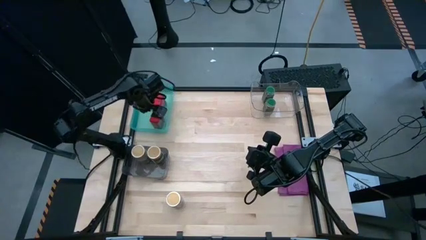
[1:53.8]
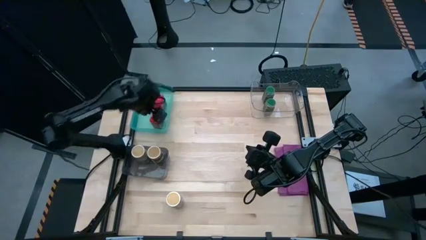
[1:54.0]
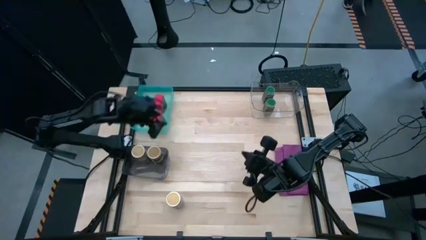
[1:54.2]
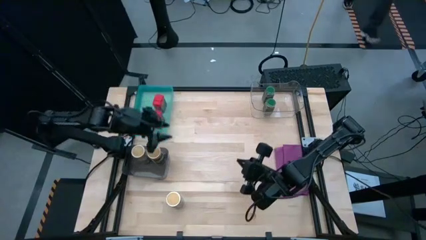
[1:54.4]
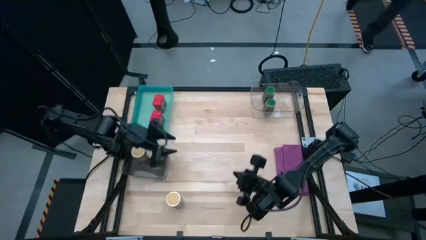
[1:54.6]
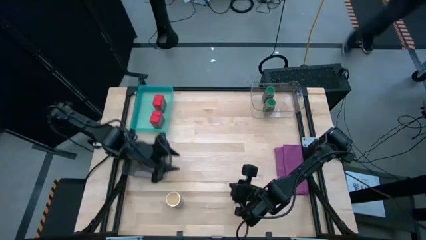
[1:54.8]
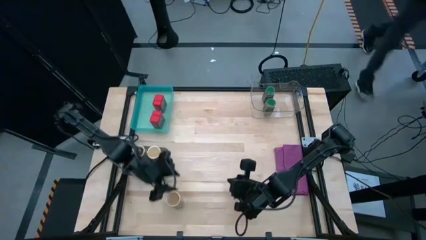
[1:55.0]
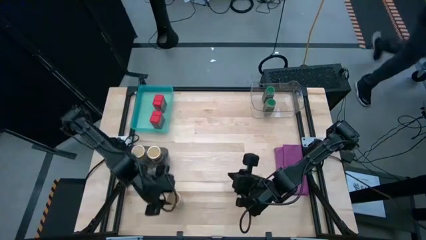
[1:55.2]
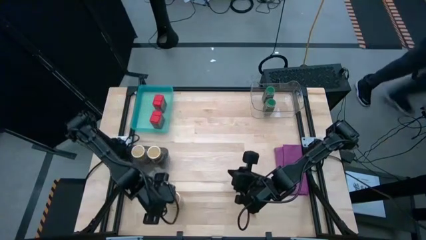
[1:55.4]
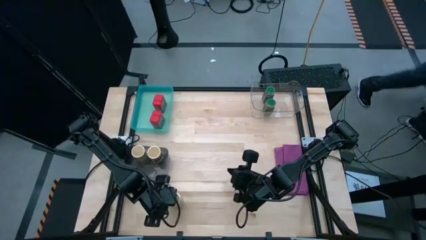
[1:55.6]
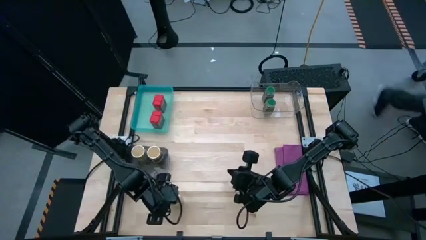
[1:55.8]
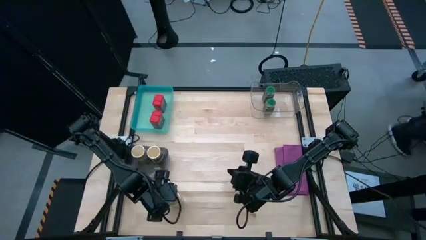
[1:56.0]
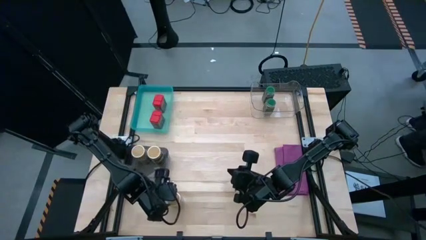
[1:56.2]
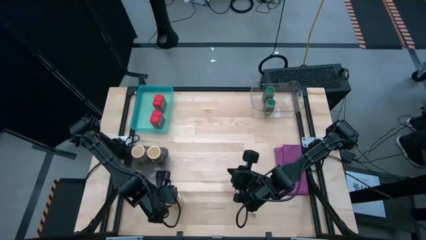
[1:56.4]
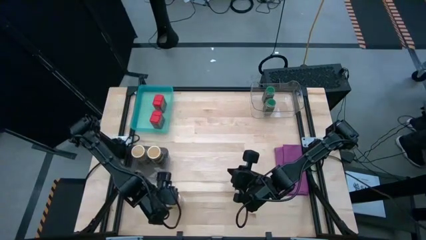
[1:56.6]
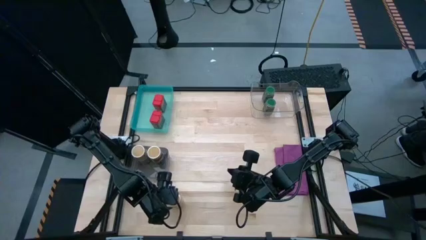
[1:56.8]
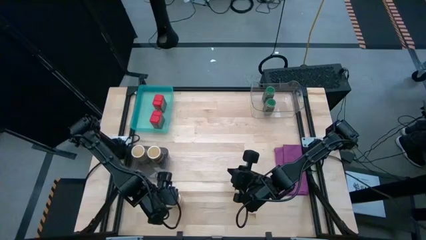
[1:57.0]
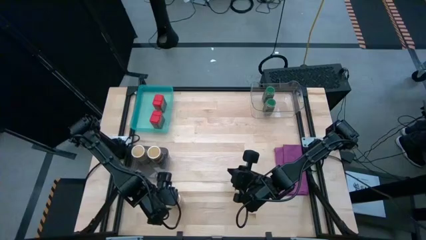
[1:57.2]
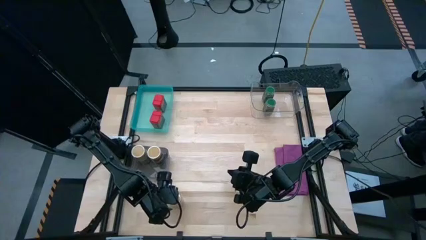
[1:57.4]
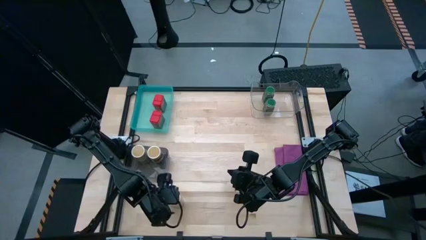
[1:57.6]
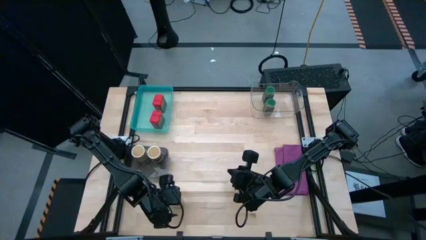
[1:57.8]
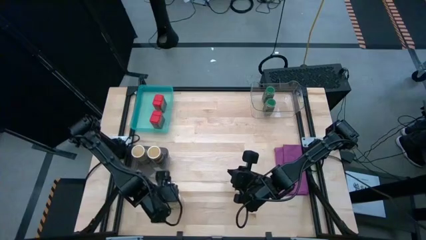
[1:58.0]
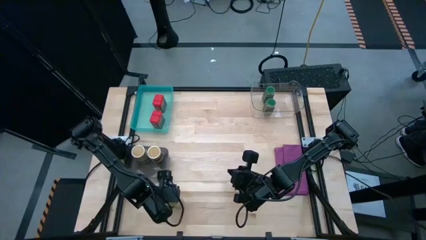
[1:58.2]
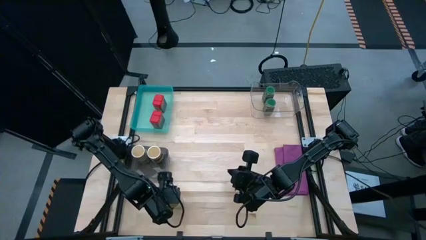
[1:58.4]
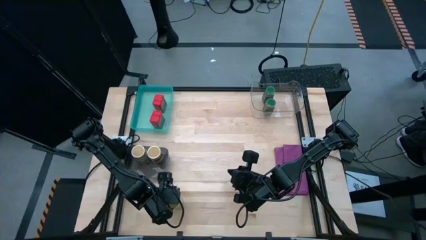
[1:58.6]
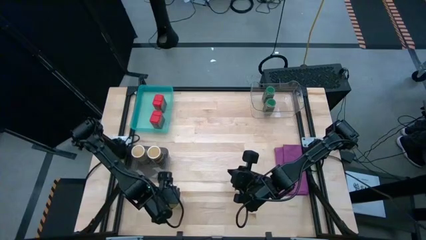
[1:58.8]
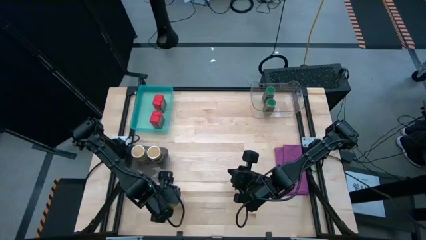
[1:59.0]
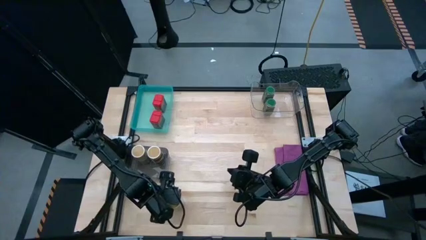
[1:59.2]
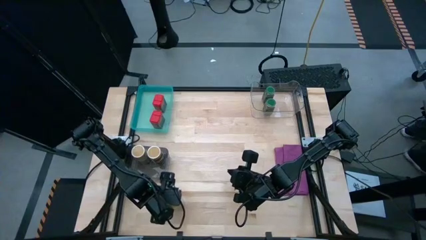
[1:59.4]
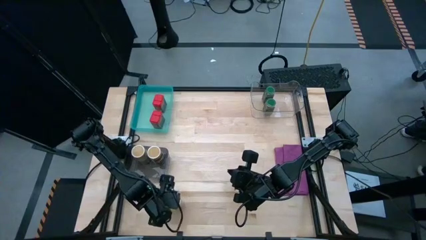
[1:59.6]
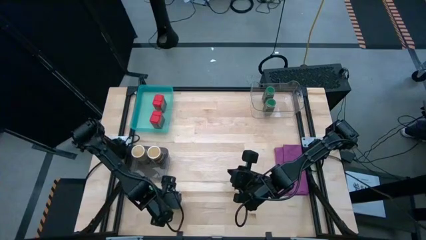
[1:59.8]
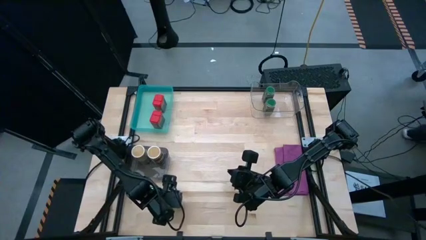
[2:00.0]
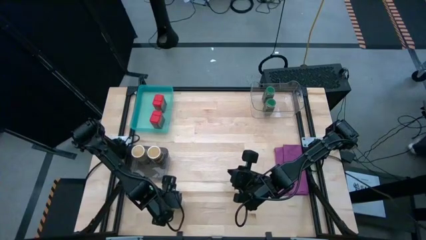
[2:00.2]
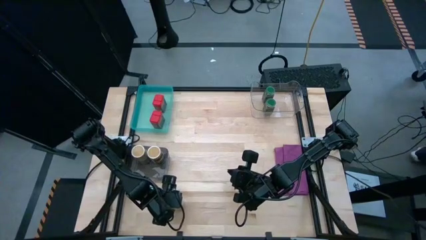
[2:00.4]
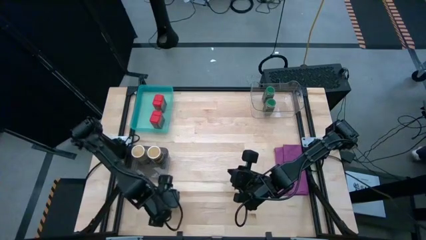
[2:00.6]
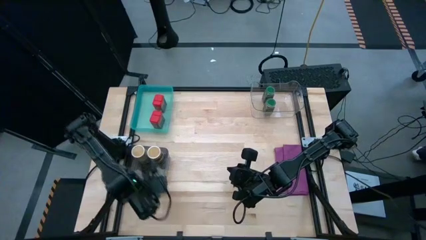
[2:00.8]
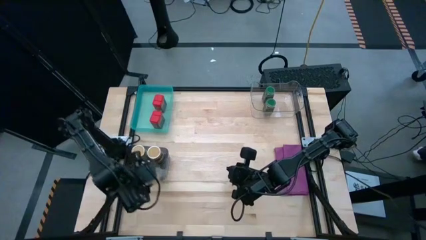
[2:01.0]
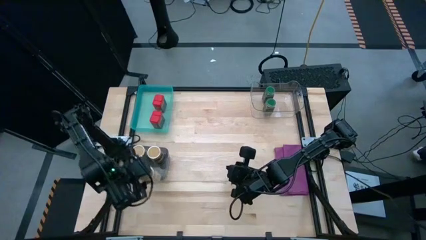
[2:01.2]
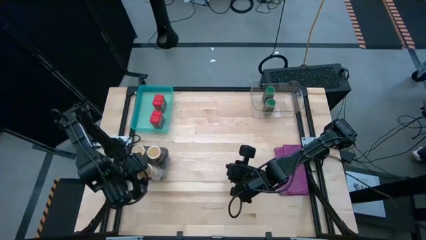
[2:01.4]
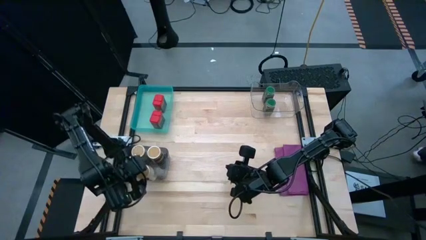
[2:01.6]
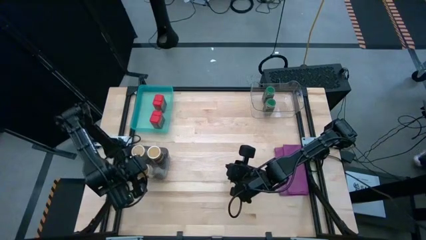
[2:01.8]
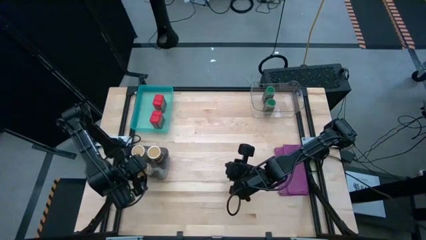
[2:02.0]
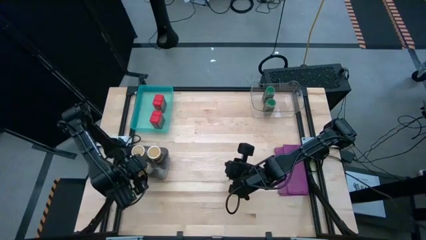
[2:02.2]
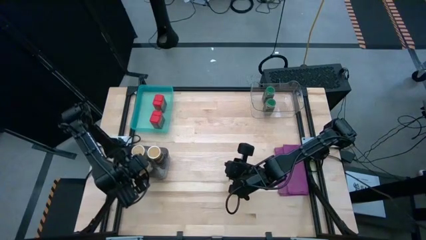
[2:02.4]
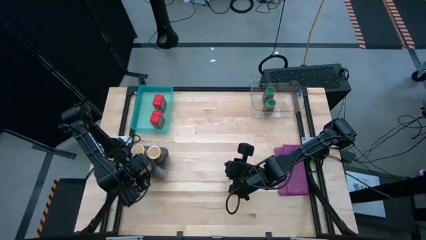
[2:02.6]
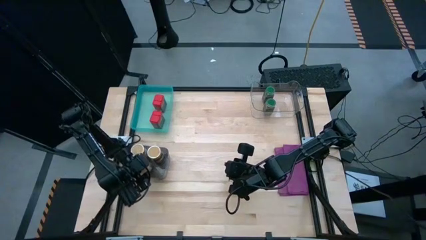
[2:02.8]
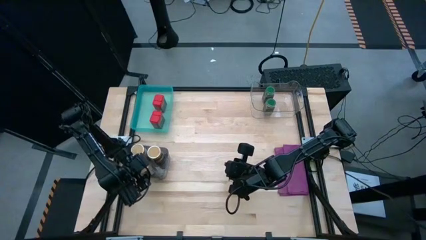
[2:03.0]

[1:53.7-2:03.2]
Task: Sort spices by type
Put the gold seasoning bottle into the black bin

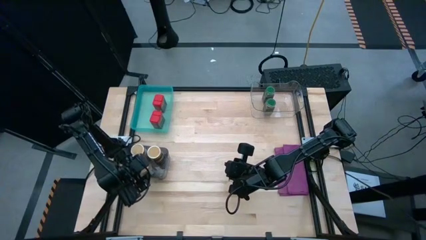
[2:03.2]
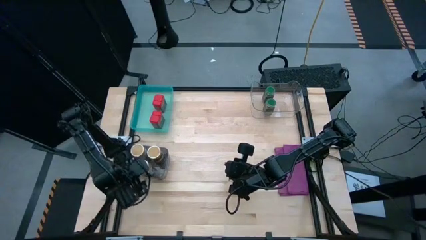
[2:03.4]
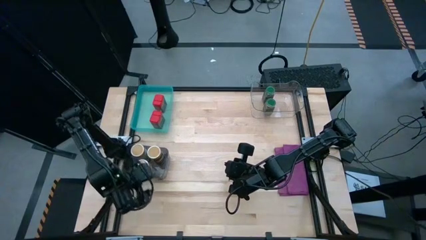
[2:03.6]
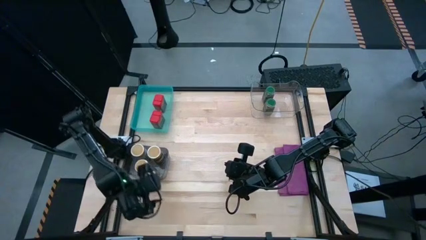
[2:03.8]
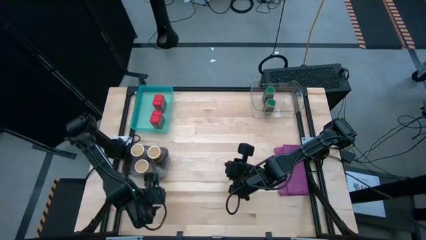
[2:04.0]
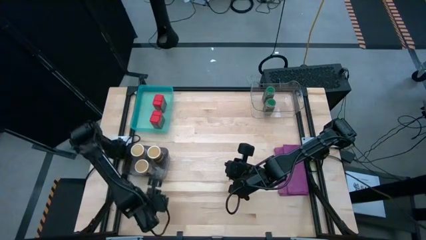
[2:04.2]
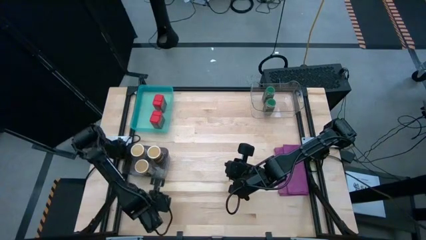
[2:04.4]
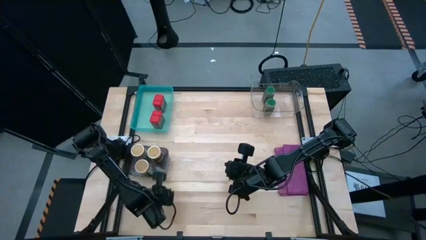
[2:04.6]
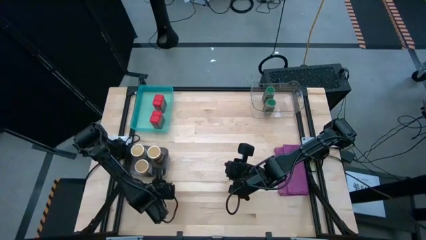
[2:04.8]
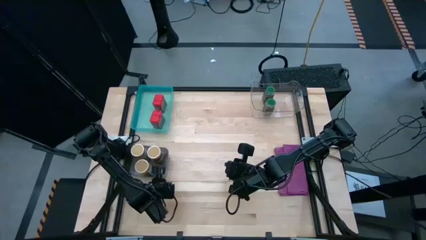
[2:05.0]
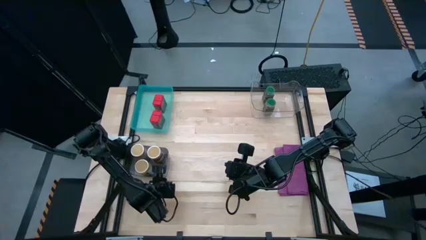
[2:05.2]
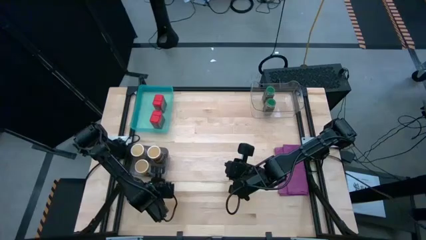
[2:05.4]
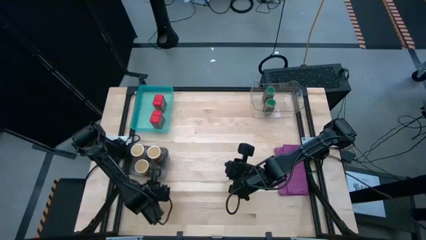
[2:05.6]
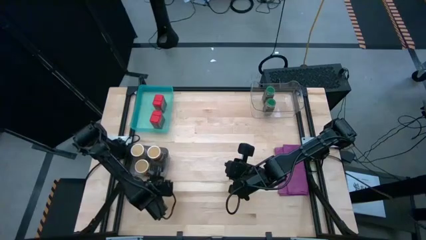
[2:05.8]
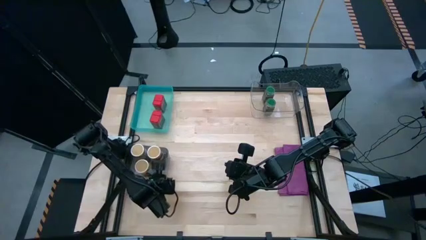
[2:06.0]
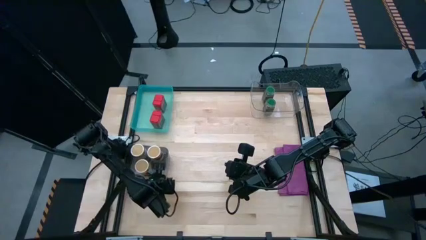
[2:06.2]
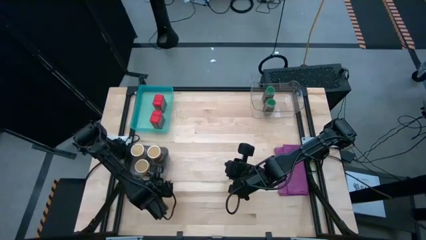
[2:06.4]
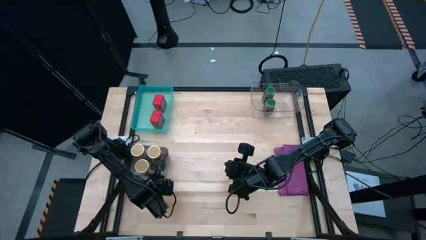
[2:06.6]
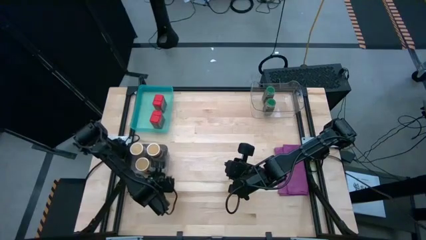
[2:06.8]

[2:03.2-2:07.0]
Adjust the black bin

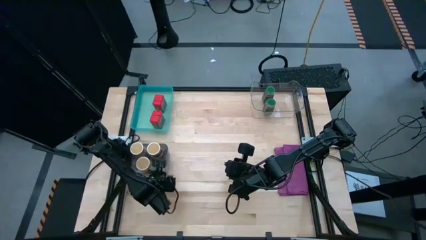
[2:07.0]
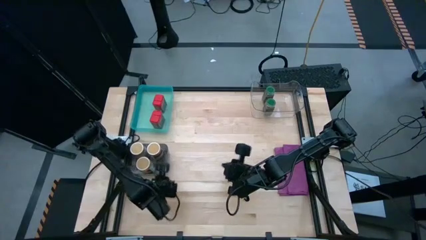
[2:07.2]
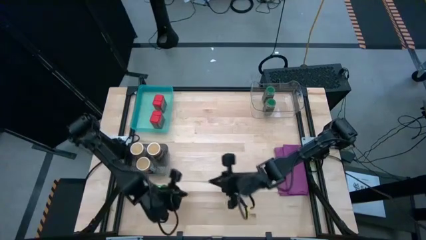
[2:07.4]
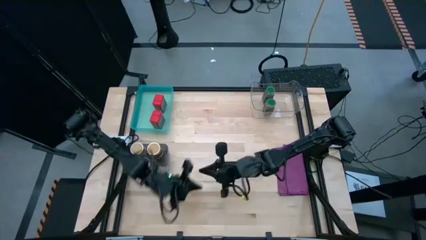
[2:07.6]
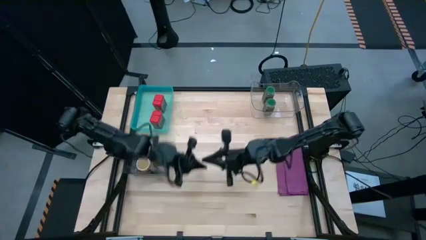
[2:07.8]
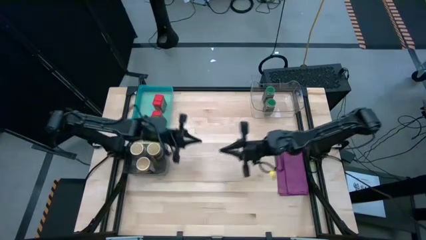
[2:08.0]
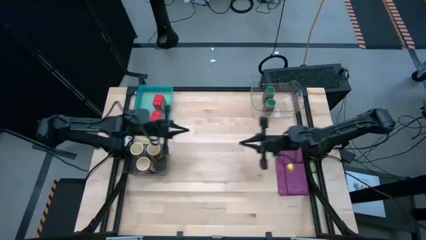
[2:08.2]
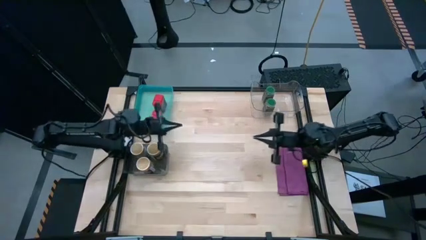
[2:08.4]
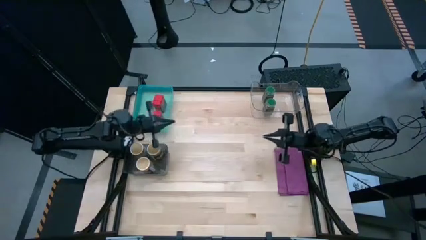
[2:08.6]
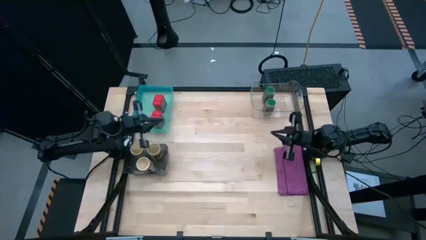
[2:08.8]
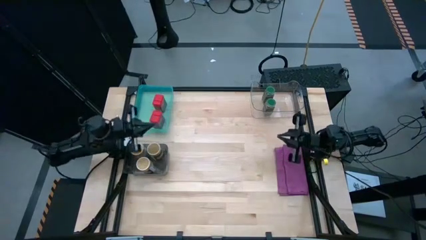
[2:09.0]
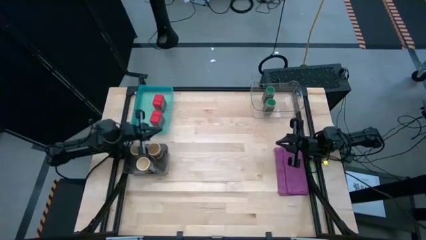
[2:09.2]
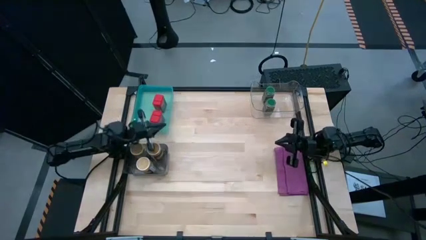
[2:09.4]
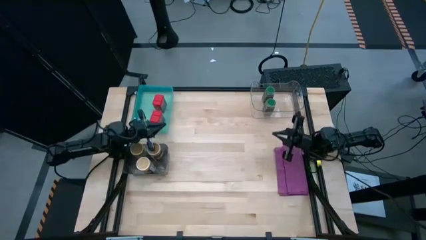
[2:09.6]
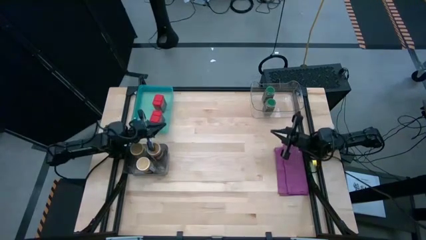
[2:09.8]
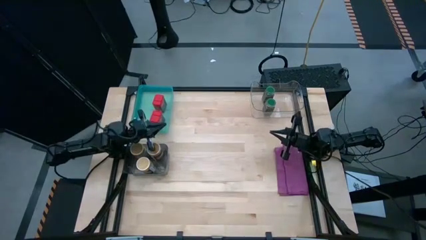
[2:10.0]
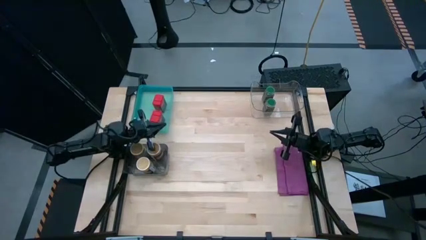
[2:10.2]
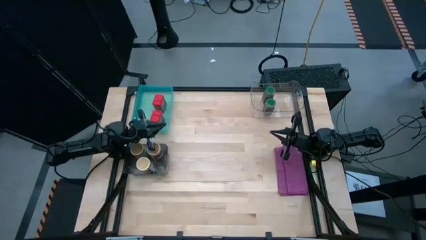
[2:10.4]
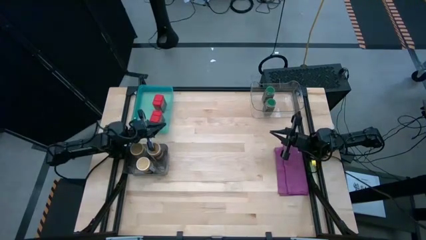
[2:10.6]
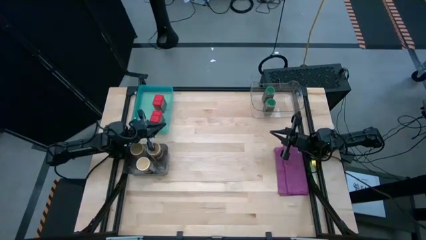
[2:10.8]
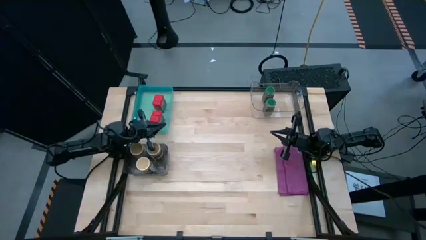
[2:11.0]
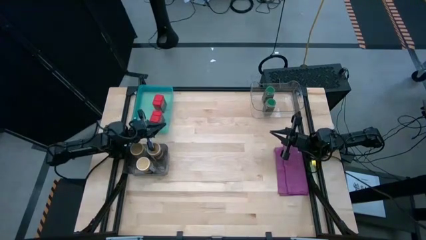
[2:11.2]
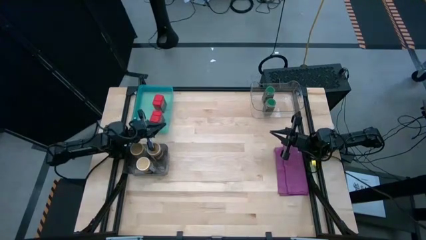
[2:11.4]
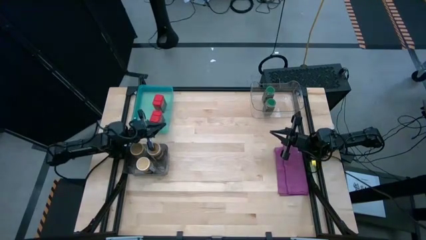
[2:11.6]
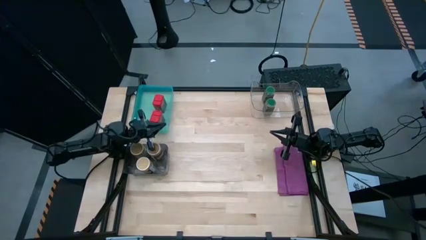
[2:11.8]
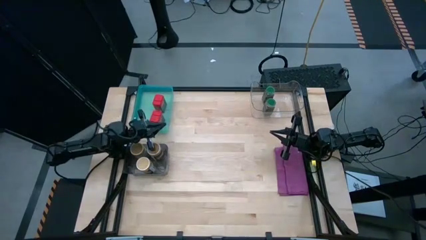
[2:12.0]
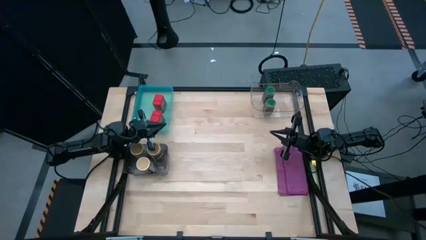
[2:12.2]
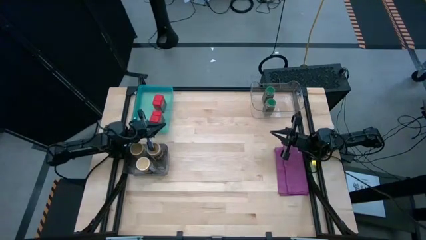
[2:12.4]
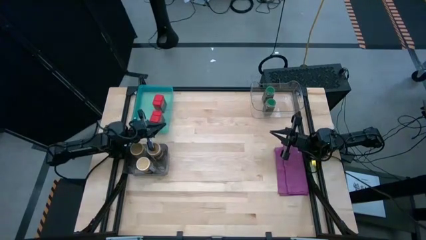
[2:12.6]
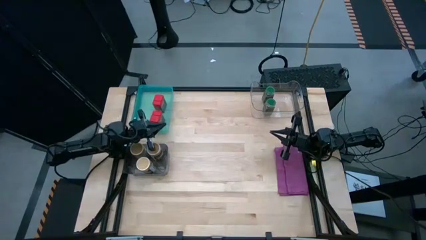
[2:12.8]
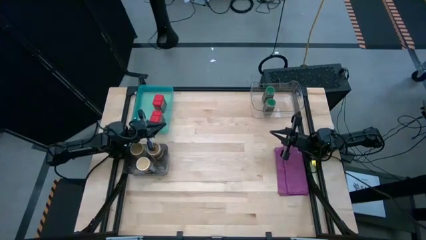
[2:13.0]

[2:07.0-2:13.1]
Return to Home Position
